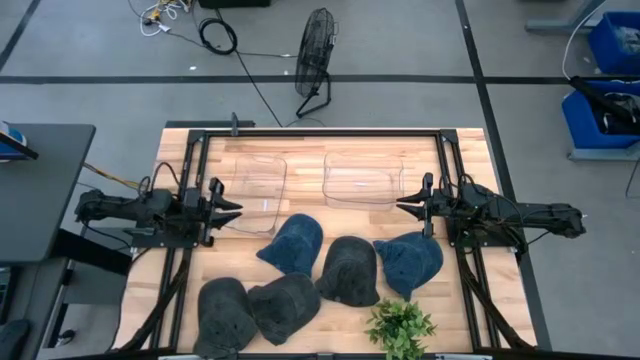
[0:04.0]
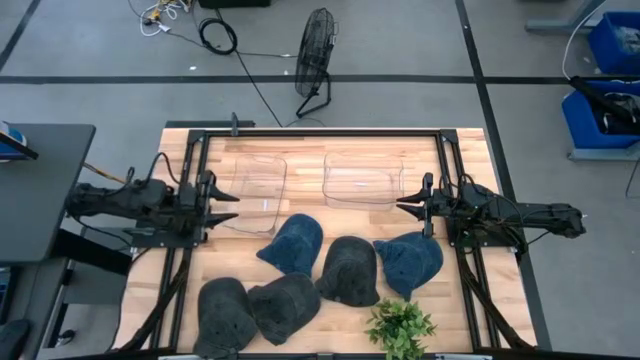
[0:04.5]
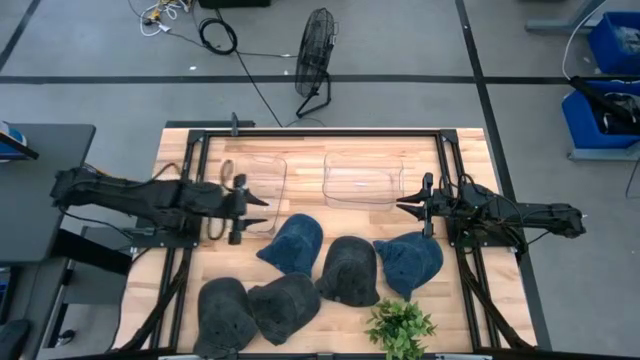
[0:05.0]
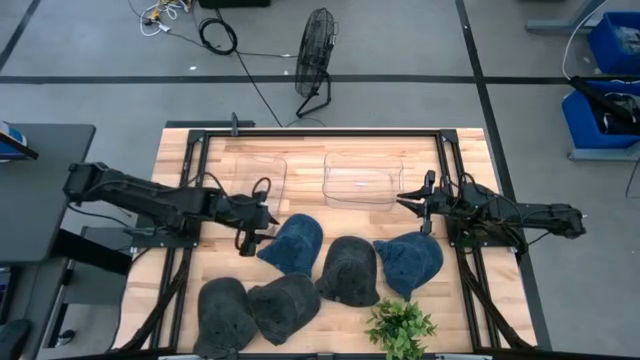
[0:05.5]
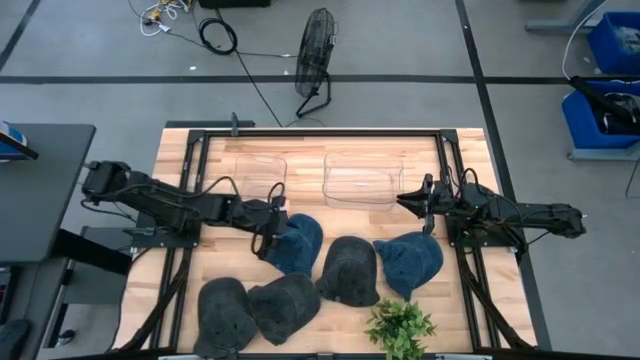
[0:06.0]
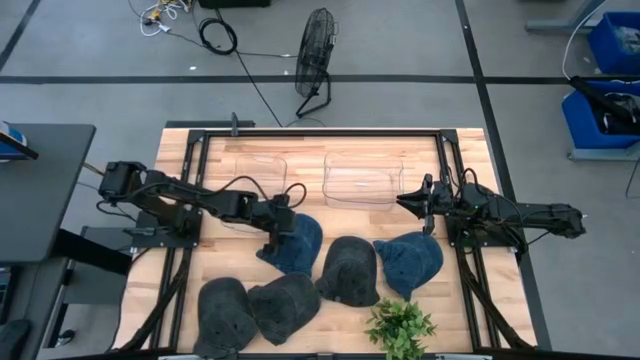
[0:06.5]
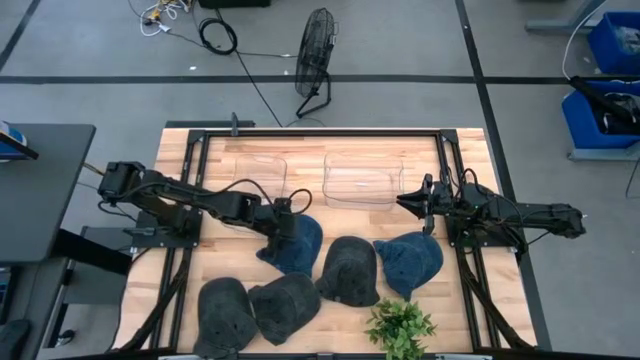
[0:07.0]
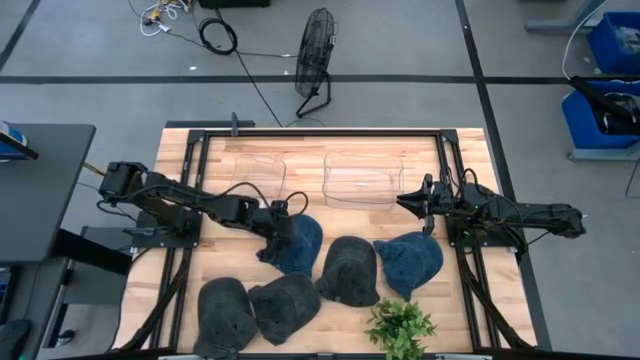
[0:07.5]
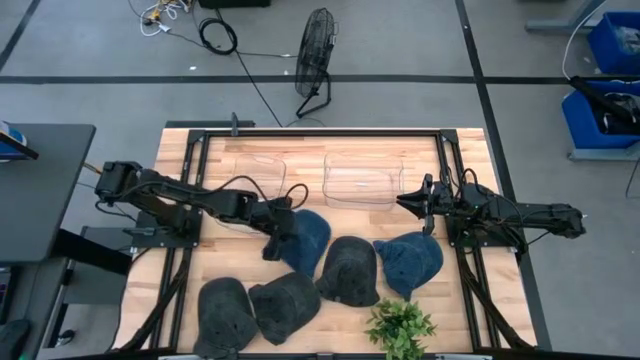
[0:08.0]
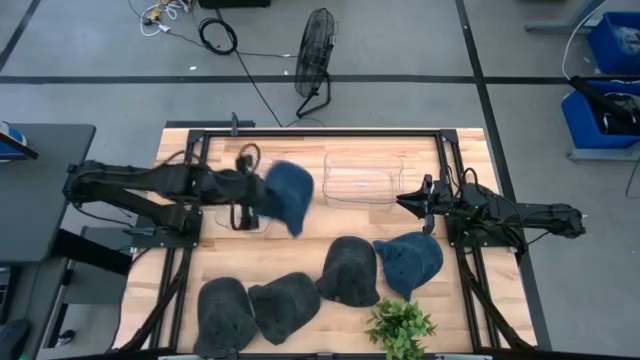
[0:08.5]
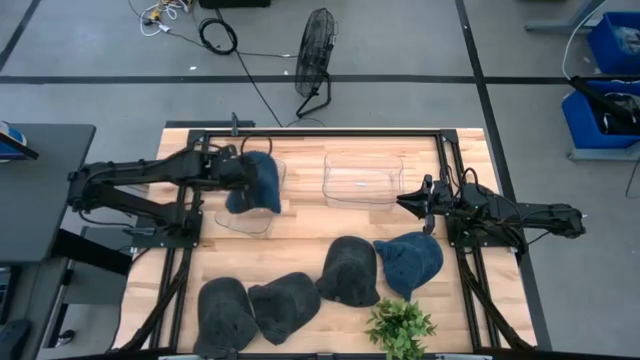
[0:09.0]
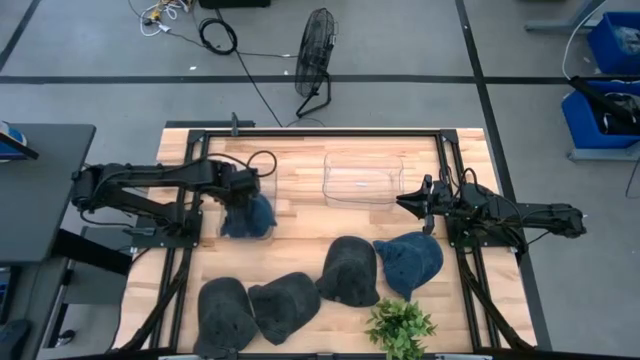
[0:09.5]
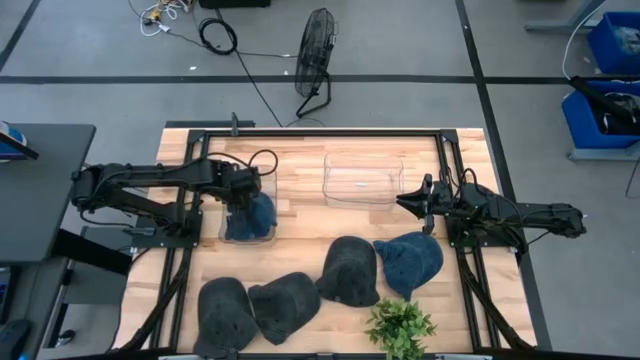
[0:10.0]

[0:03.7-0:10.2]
Task: Pick & Place hat
Put the left blue cap into the left transparent bin

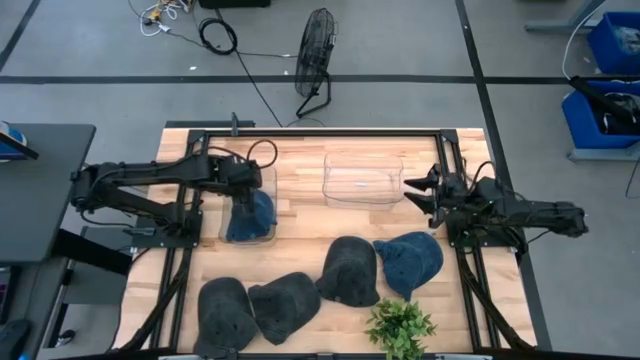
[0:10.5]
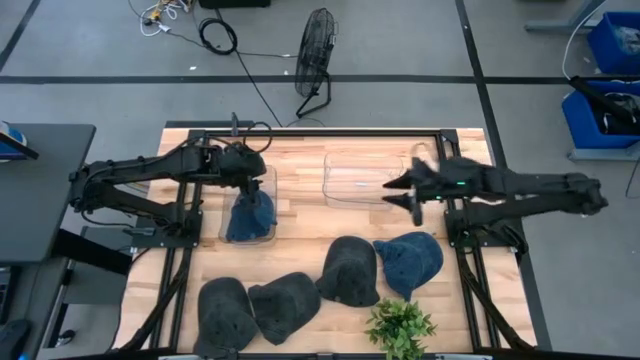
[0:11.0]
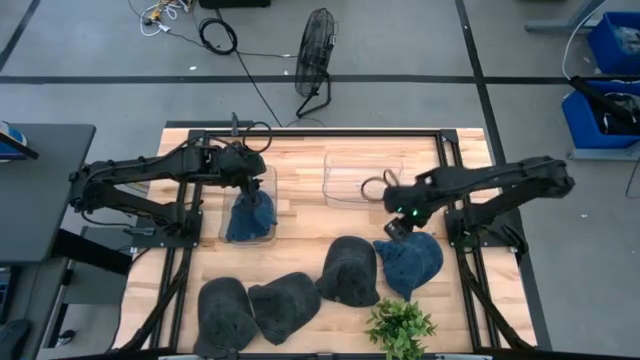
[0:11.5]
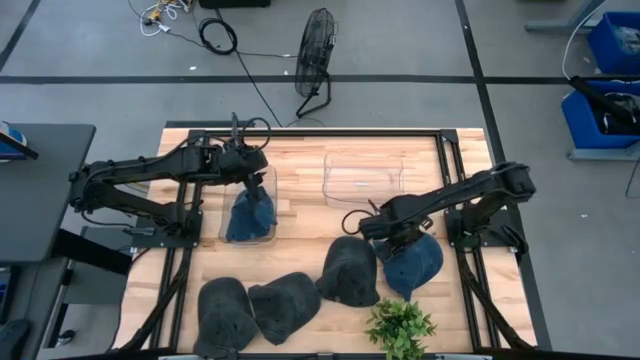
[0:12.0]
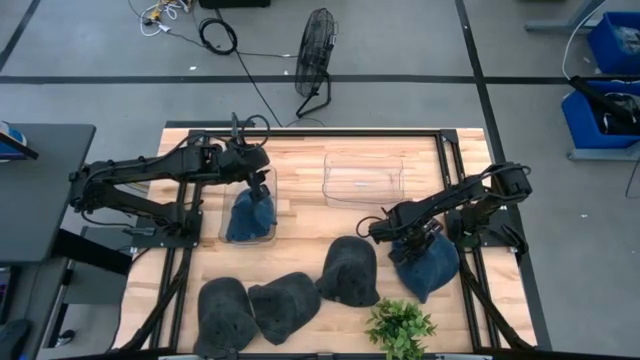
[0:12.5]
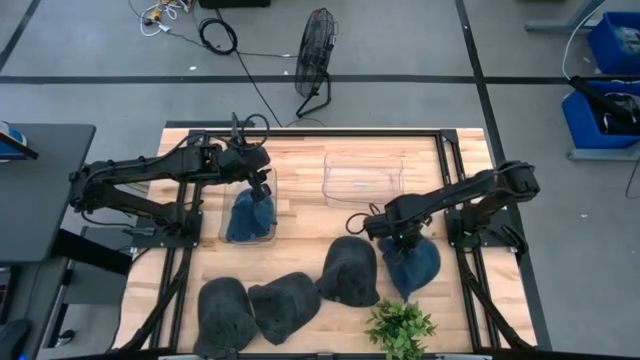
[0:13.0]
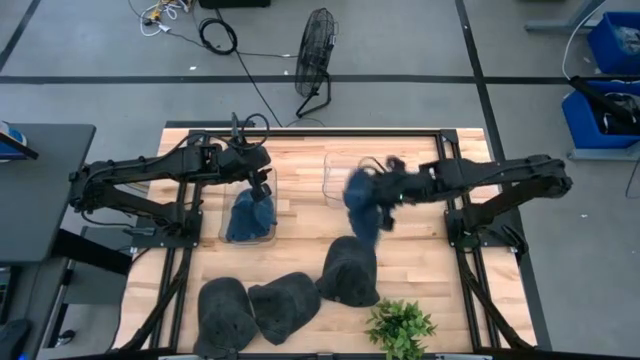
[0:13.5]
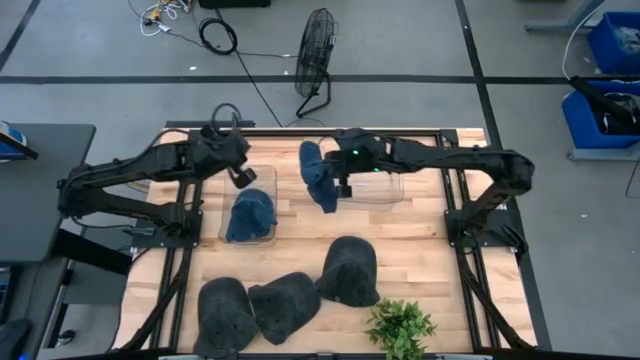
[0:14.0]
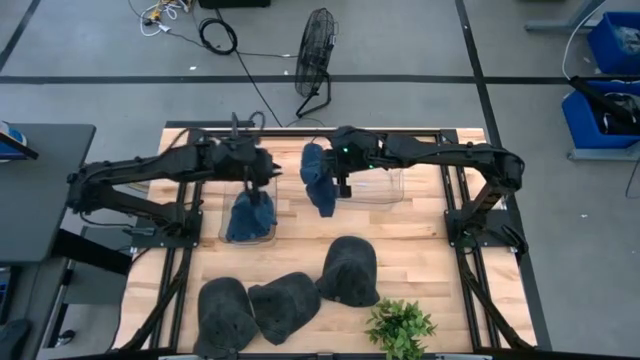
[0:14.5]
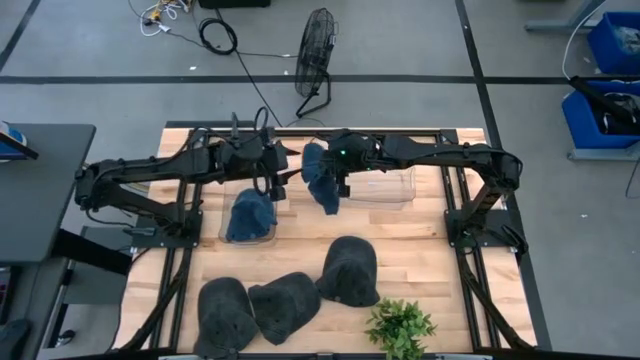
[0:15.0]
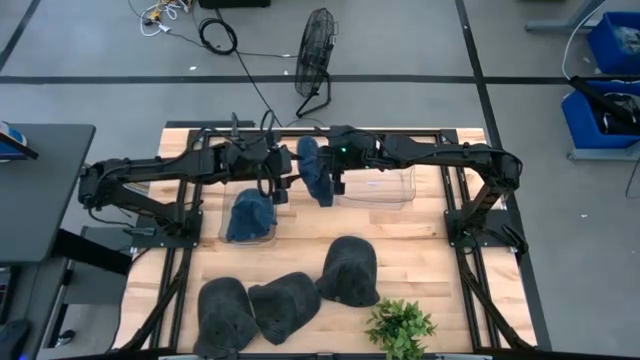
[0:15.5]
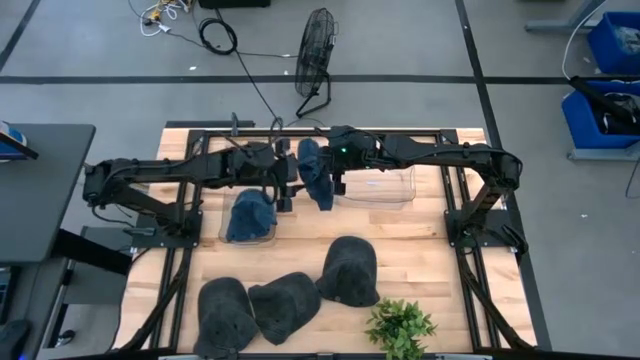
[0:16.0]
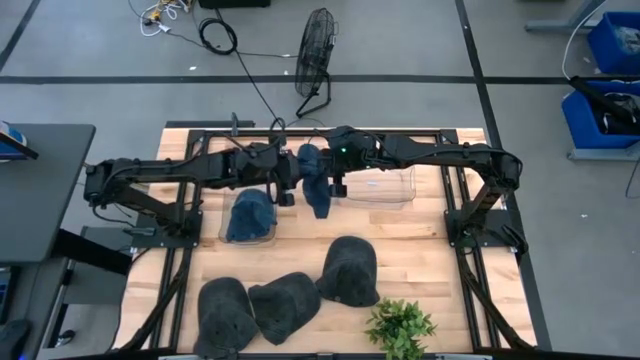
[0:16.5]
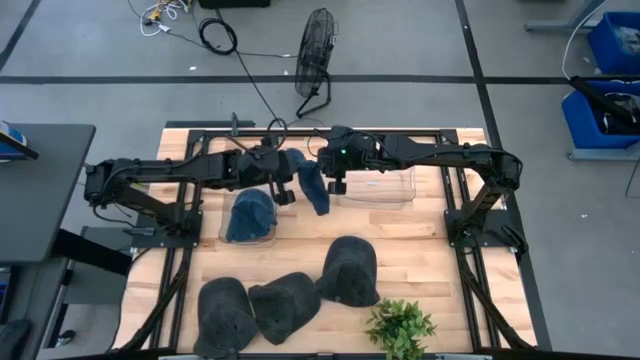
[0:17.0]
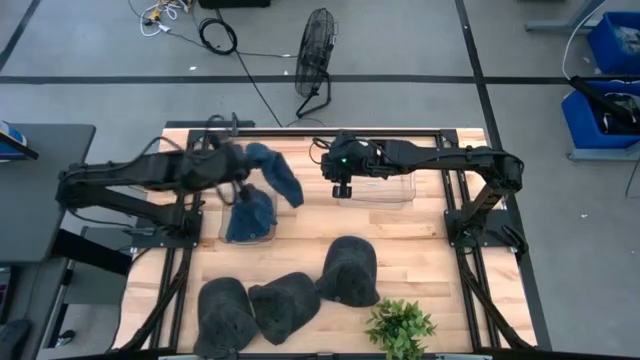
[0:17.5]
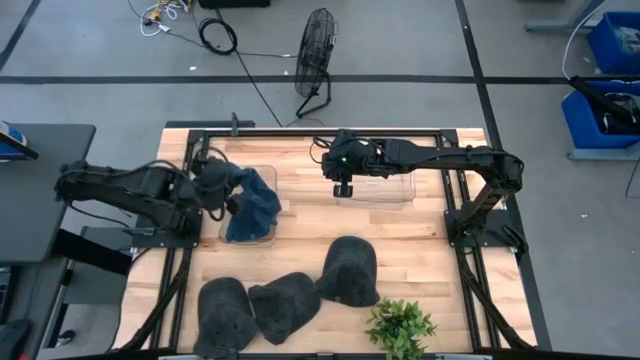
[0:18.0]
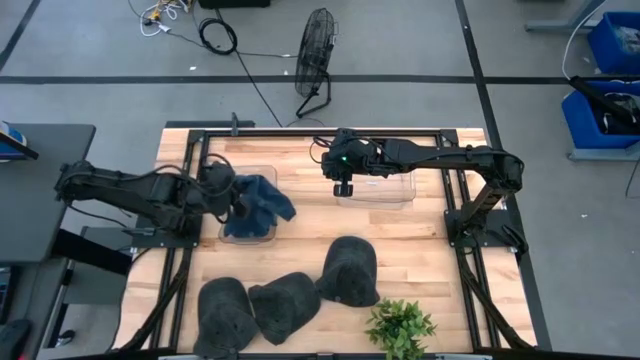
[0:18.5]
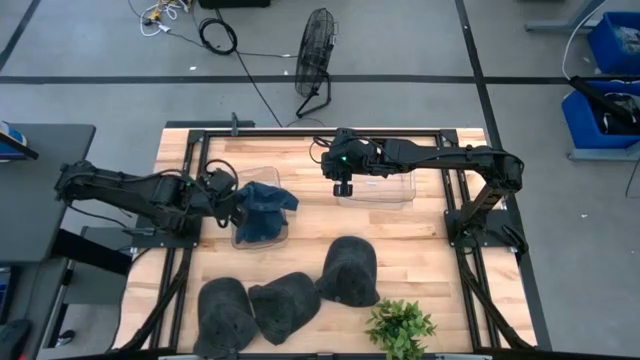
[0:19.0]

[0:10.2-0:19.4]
Put the blue cap into the left transparent bin

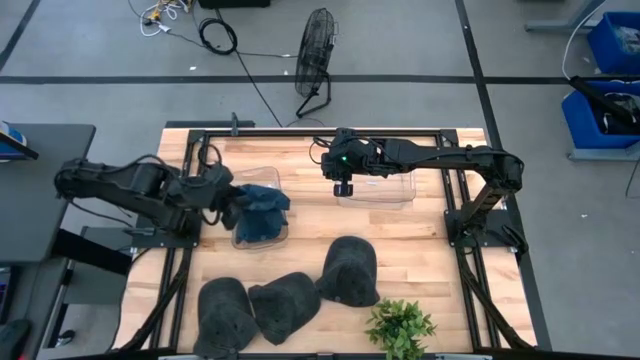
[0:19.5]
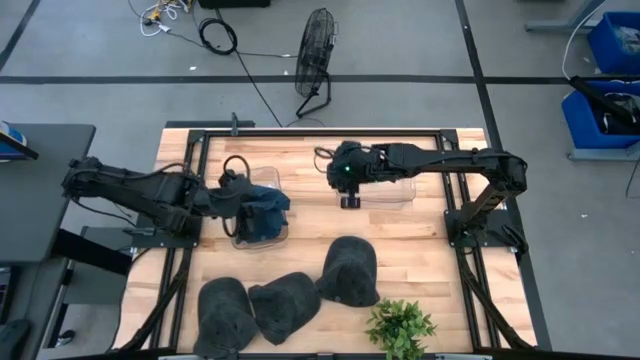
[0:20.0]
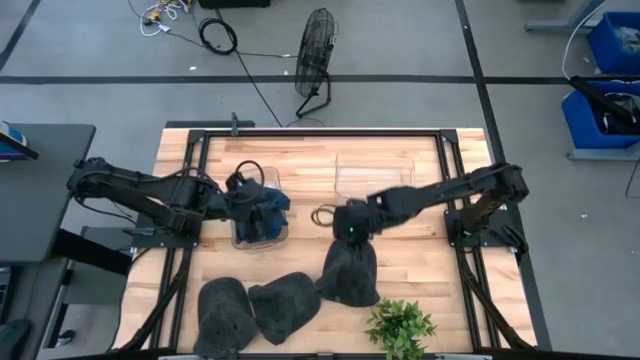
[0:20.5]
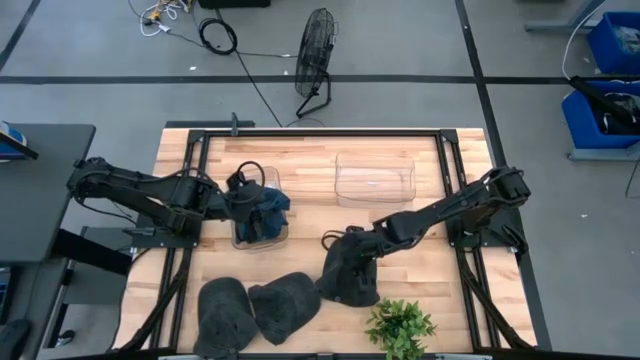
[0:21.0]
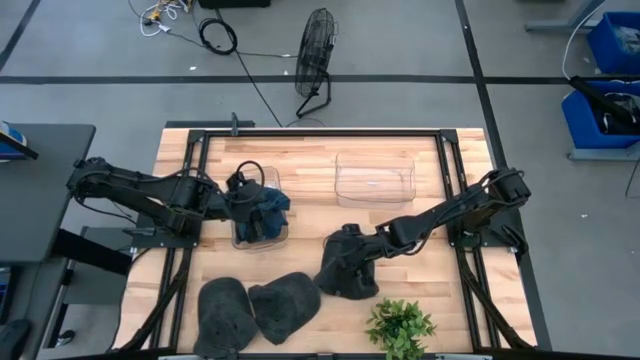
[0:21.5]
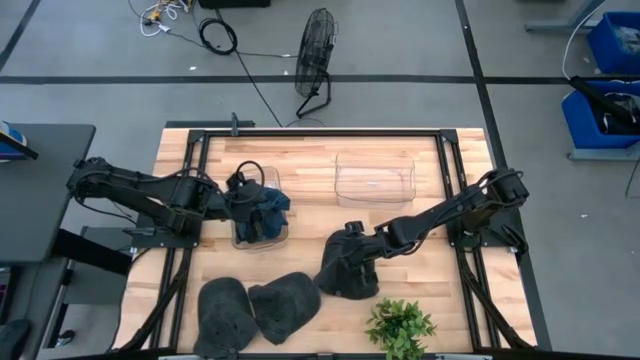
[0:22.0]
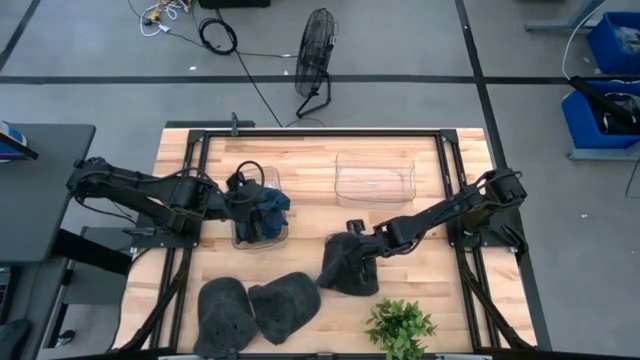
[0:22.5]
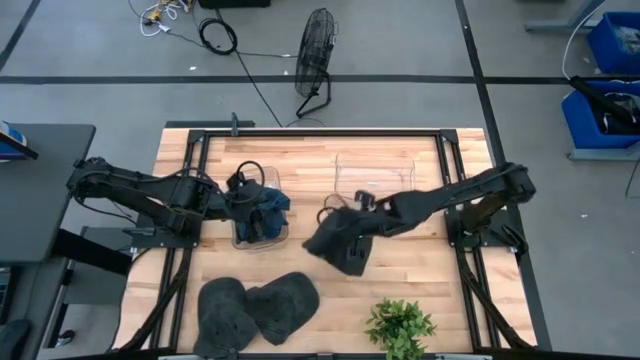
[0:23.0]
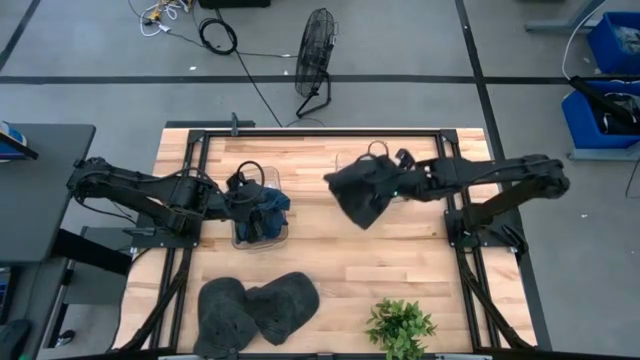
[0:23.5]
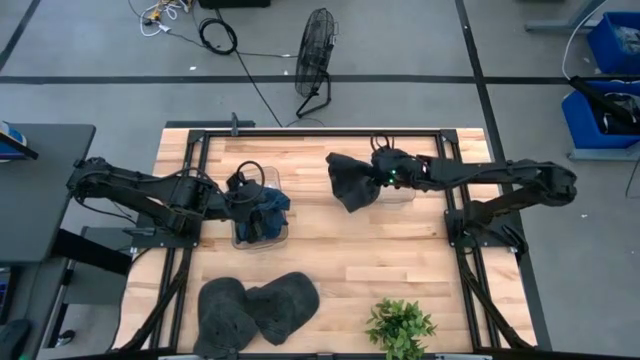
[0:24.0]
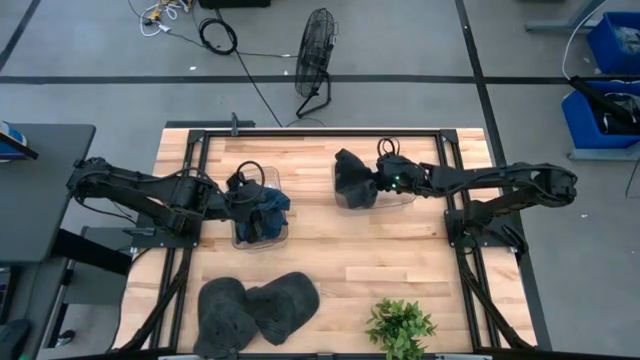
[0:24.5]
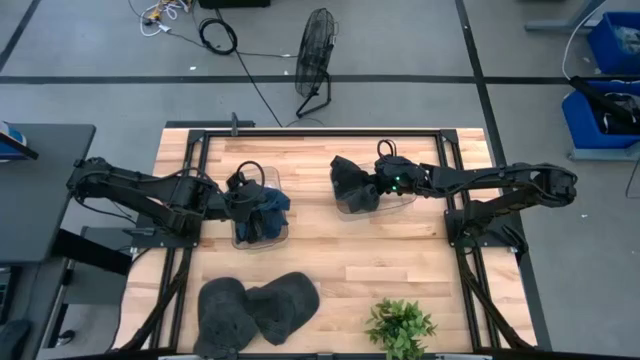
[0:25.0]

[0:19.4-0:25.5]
Put the right black cap into the right transparent bin
